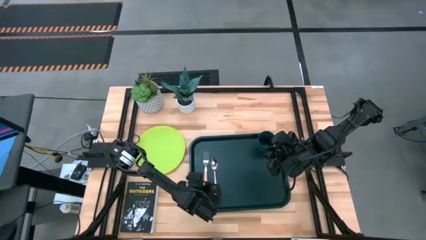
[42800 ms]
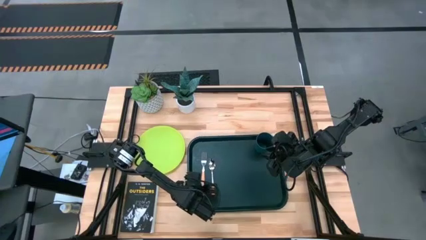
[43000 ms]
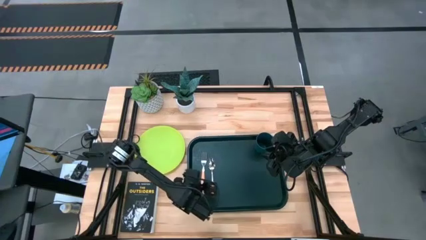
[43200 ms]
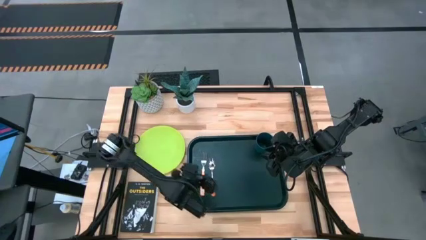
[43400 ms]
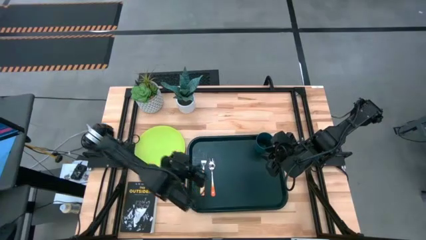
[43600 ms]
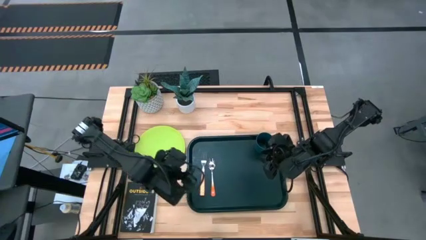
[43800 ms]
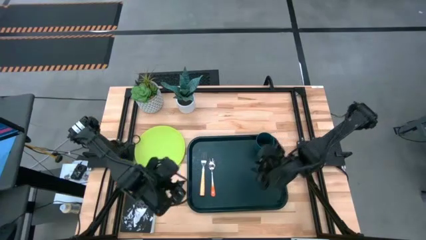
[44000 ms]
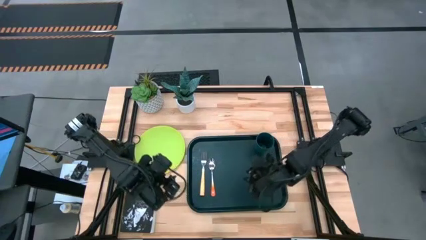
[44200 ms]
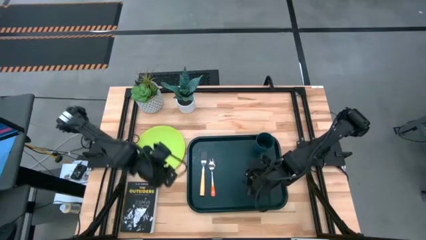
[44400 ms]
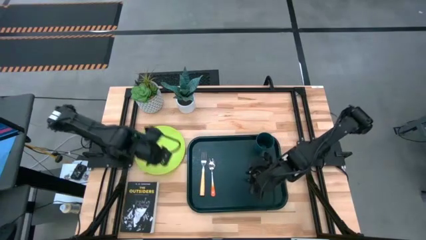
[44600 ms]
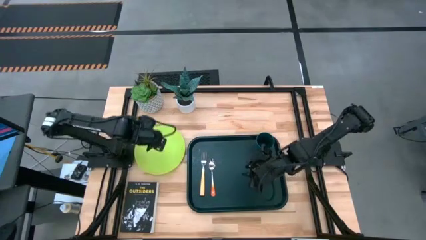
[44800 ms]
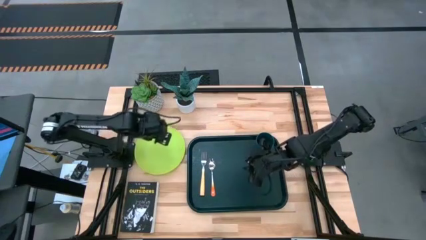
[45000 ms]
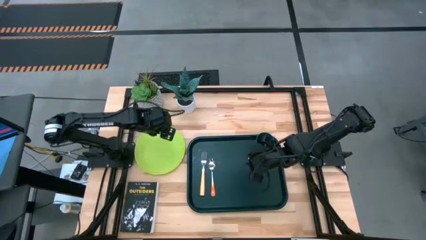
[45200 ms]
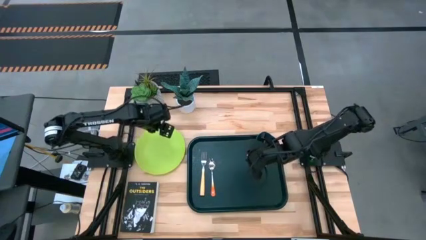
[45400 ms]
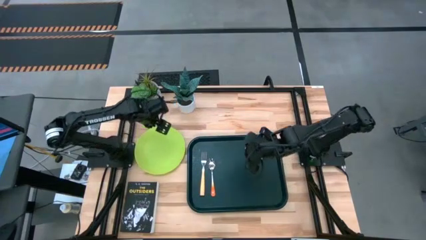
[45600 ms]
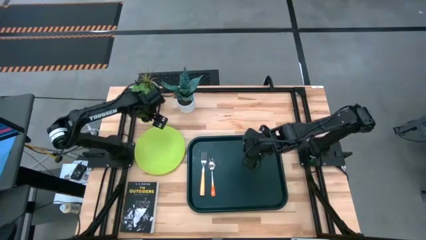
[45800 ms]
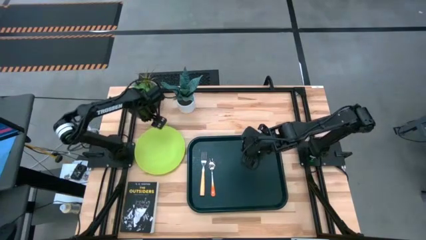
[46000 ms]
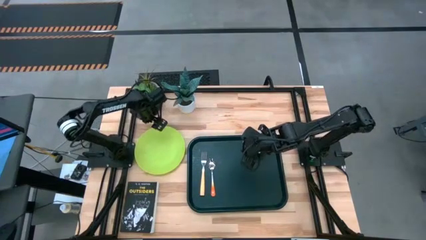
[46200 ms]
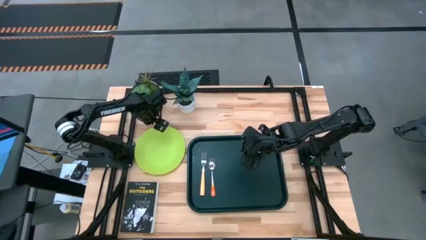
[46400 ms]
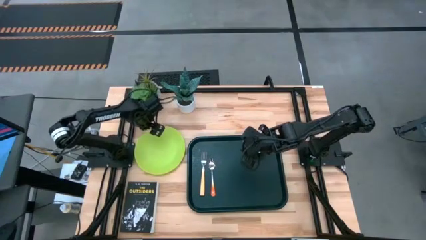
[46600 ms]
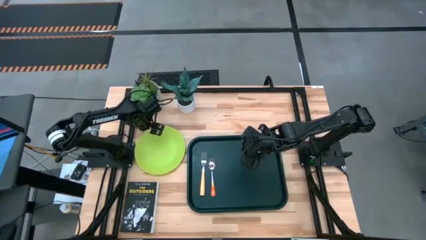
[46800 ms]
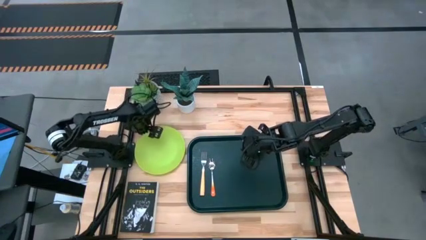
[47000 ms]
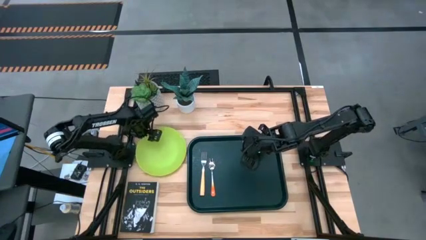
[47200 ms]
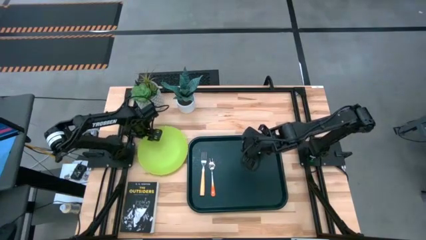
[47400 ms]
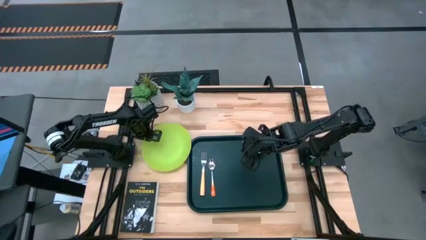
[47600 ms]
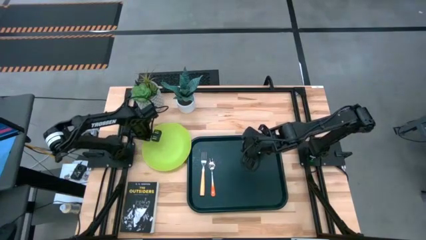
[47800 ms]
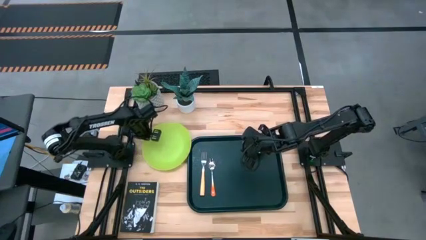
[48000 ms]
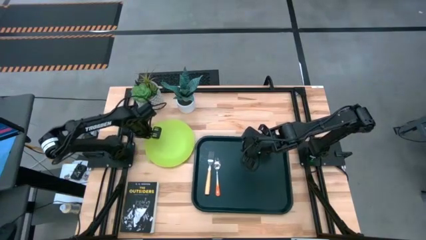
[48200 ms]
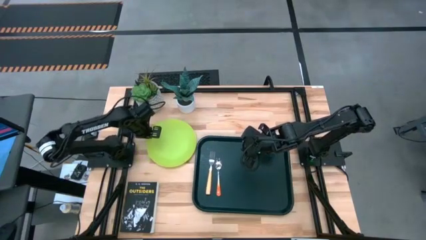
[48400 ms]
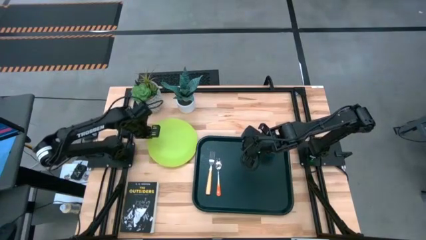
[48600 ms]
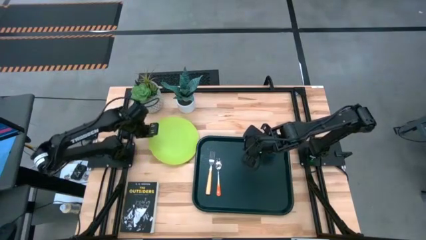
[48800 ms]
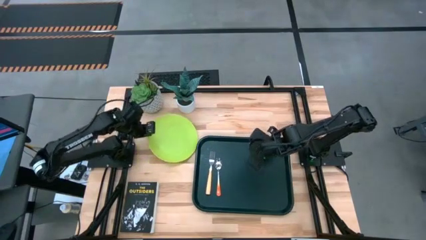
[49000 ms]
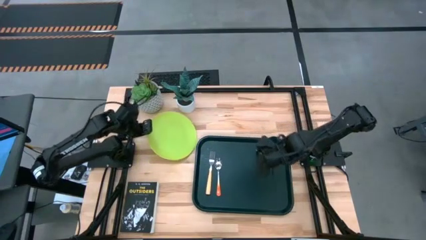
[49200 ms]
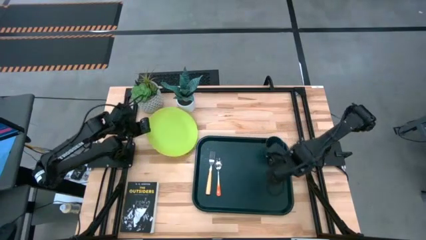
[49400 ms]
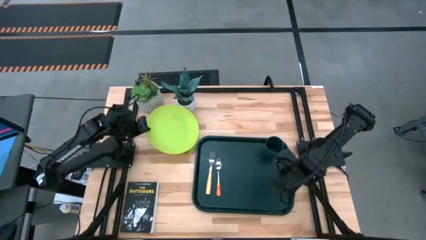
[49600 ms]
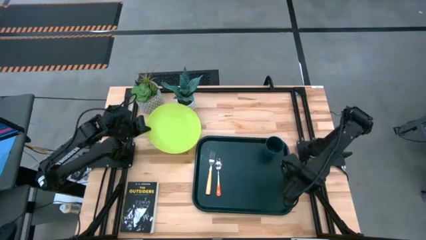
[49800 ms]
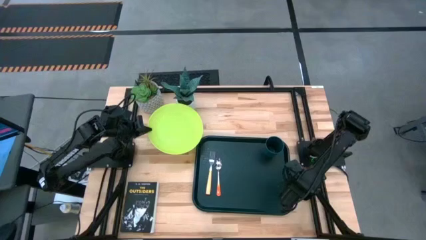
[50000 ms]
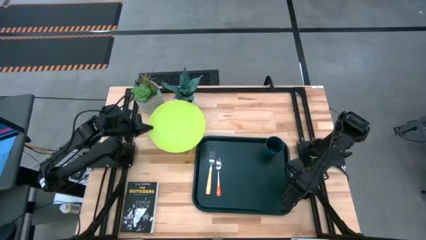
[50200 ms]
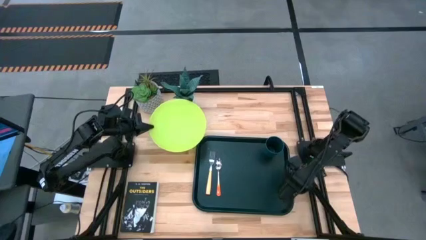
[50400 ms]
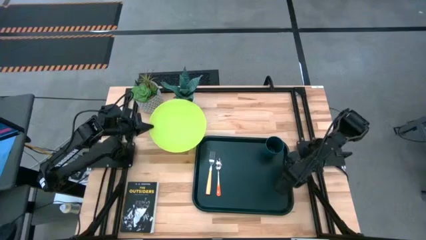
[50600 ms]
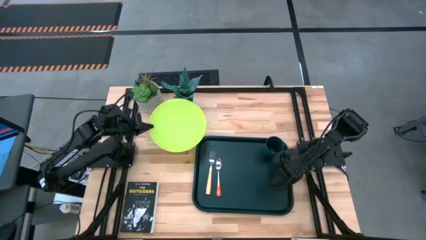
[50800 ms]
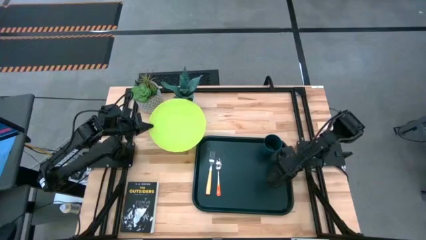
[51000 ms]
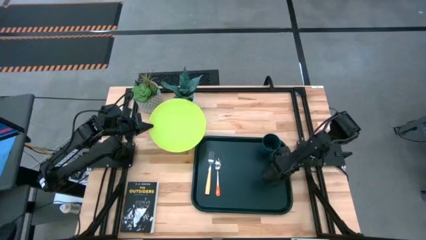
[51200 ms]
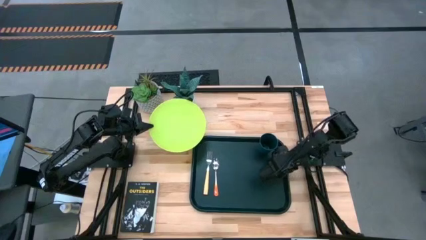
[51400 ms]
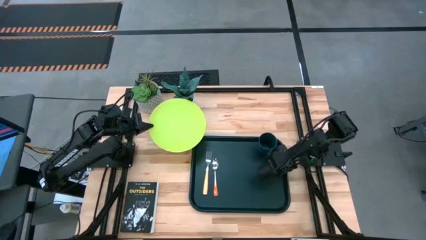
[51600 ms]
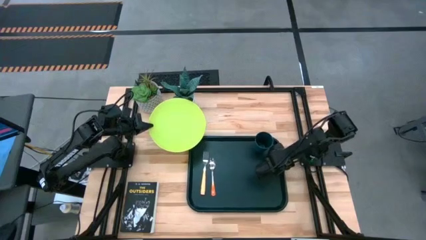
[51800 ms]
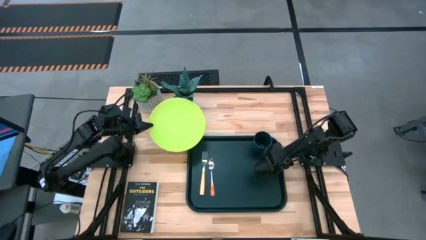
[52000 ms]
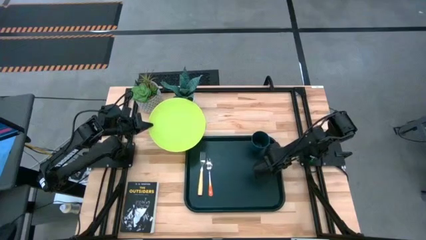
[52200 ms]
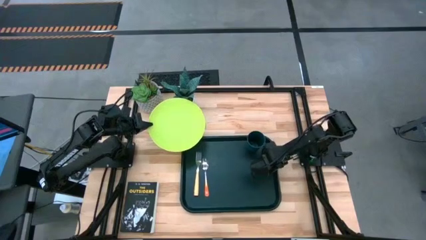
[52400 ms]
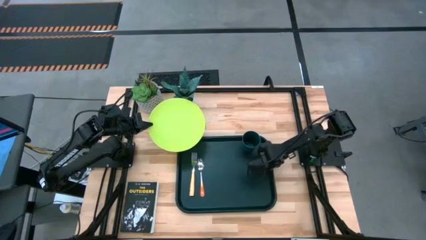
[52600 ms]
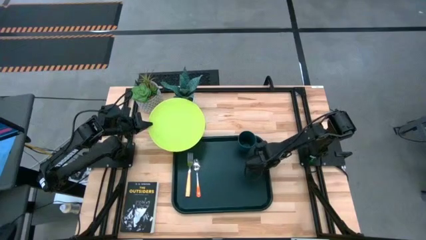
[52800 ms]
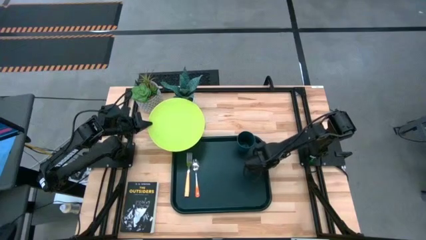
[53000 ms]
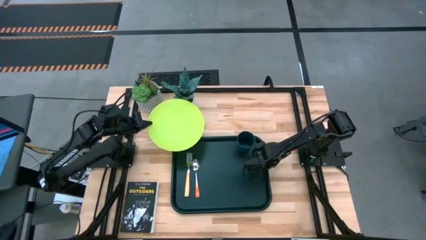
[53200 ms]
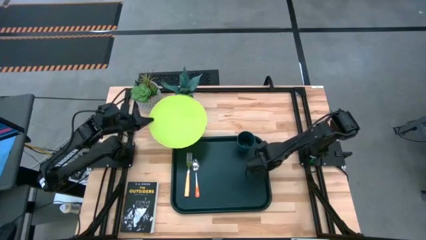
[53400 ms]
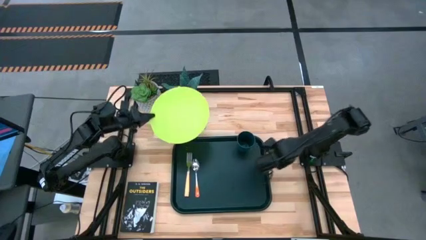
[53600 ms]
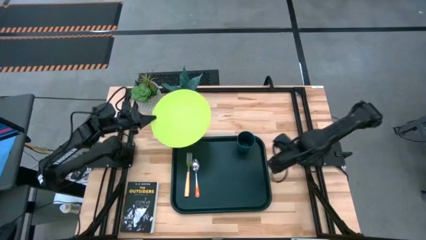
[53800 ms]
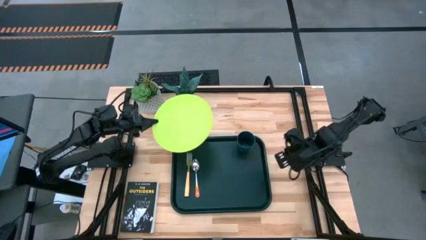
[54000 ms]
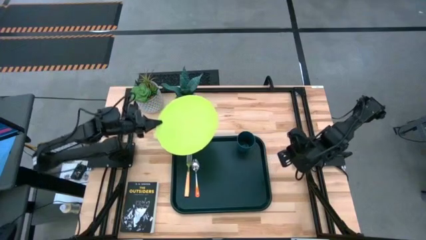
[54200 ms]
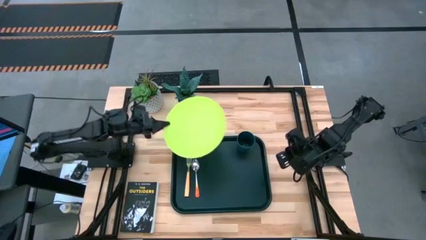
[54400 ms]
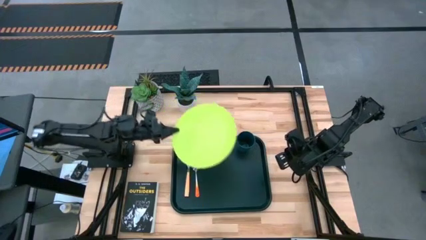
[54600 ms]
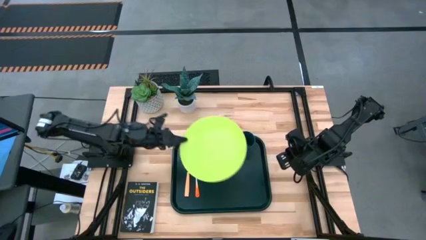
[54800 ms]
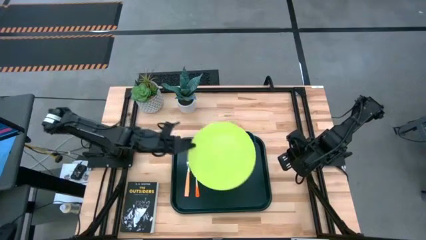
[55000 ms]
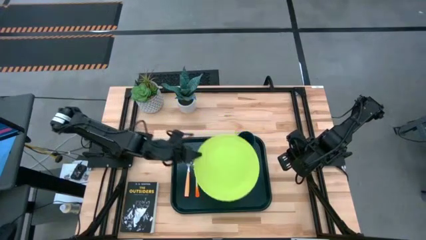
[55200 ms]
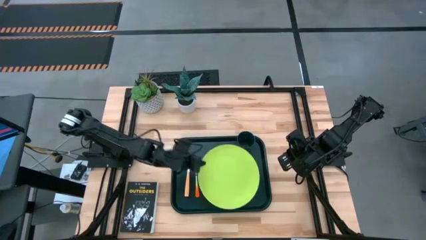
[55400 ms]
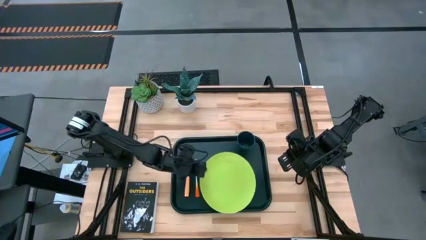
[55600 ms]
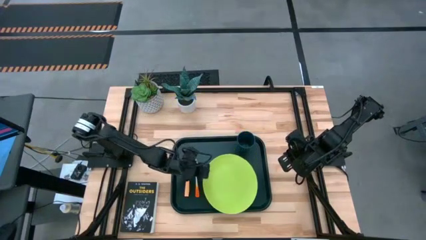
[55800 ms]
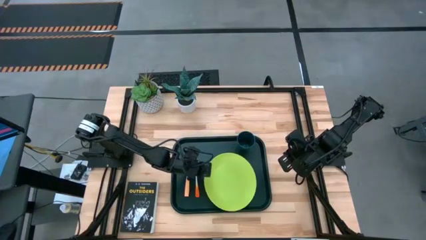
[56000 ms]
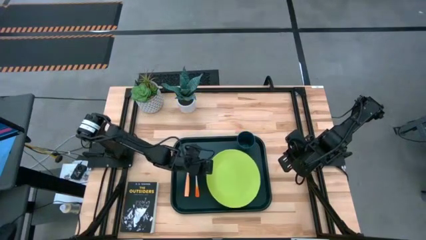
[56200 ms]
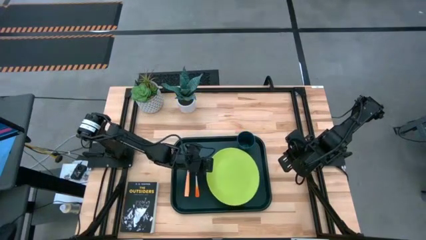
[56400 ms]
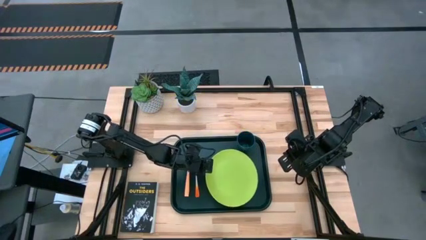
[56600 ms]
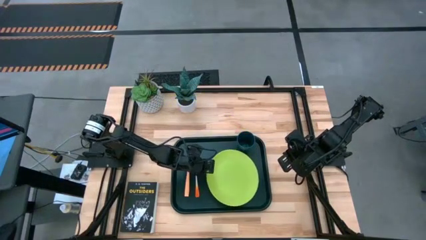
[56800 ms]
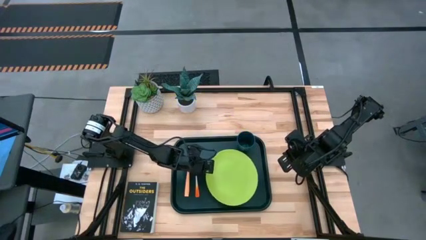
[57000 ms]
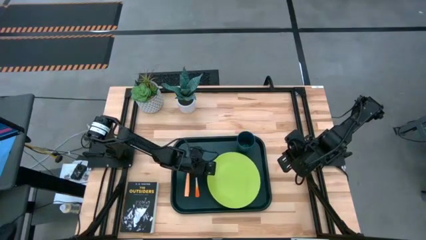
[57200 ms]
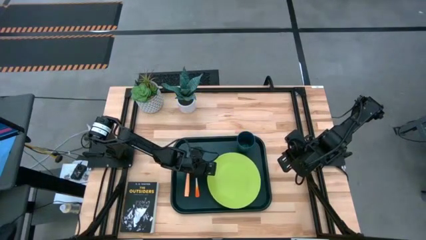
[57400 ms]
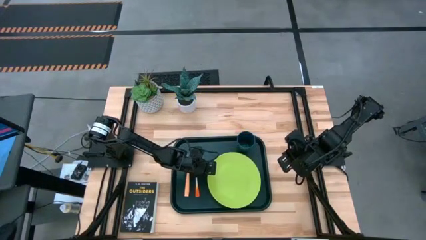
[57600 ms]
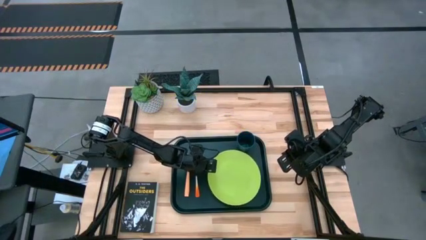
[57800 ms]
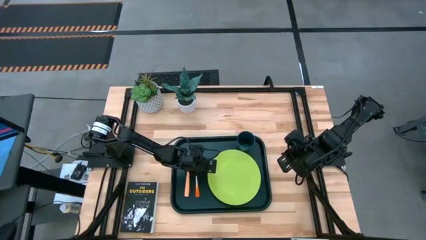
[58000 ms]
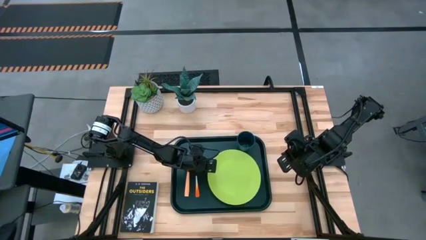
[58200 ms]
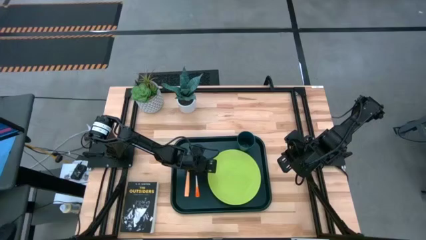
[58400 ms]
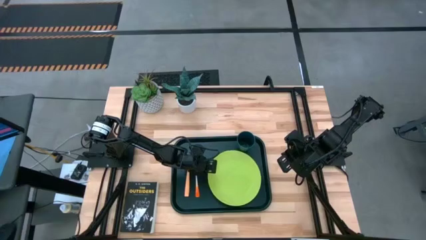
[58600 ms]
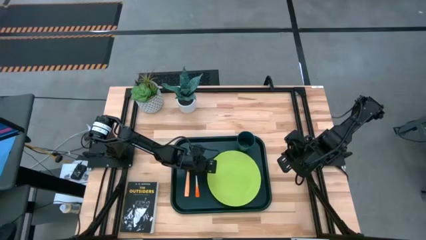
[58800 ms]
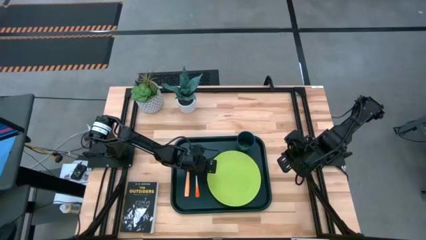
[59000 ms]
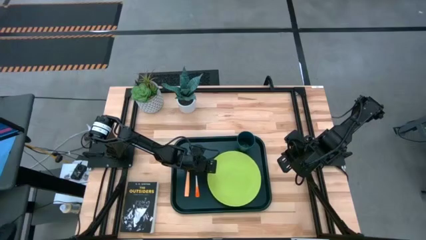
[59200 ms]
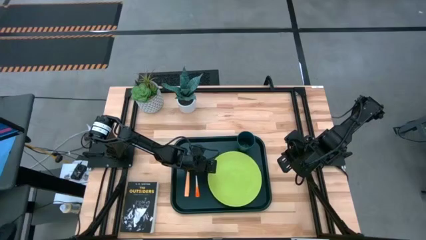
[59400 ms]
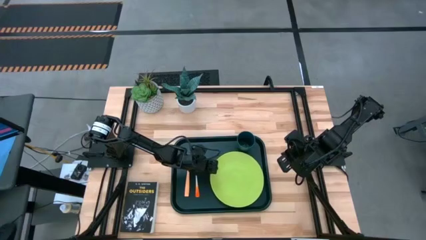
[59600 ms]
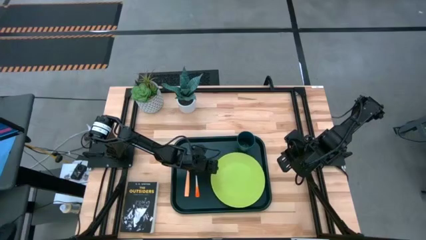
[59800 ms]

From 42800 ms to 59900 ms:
Task: Pick and place plate/cup/fork/spoon on tray
Put the green plate to the right of the orange white spoon on the black tray
